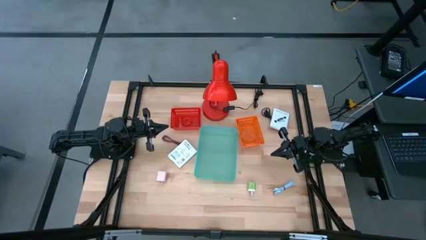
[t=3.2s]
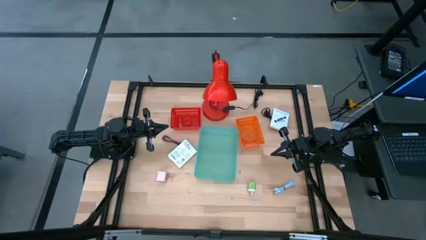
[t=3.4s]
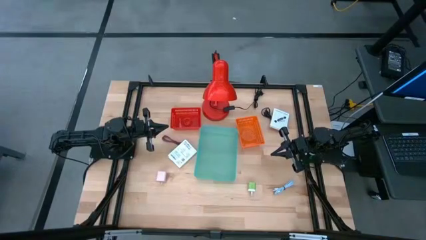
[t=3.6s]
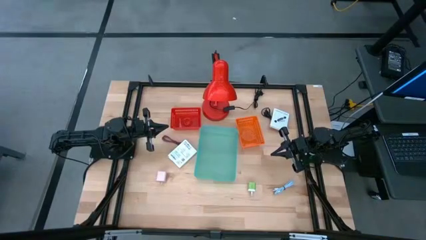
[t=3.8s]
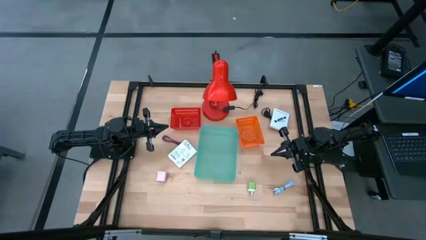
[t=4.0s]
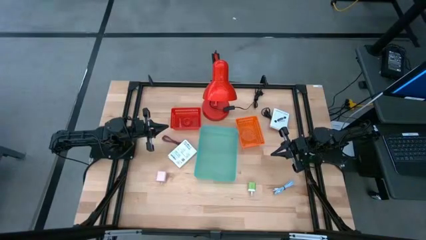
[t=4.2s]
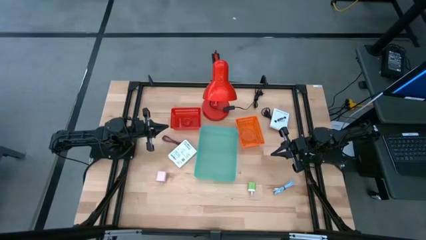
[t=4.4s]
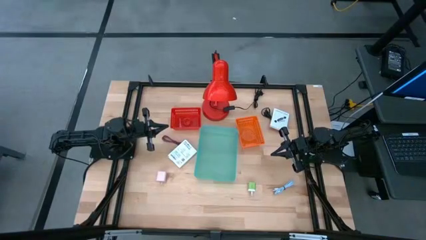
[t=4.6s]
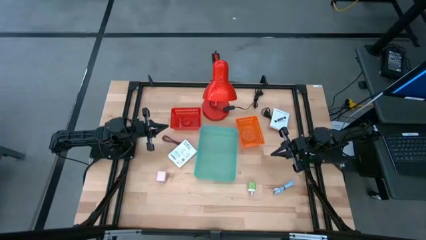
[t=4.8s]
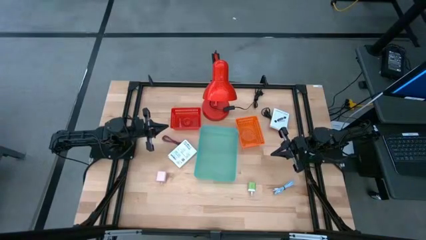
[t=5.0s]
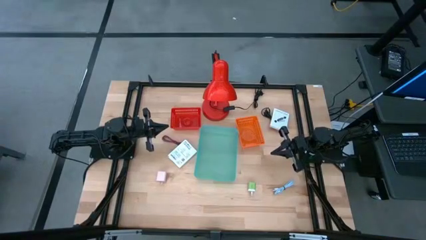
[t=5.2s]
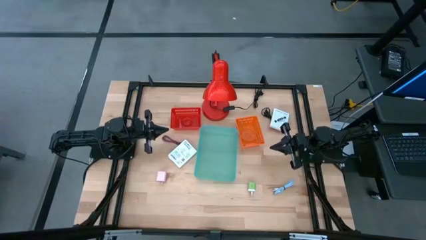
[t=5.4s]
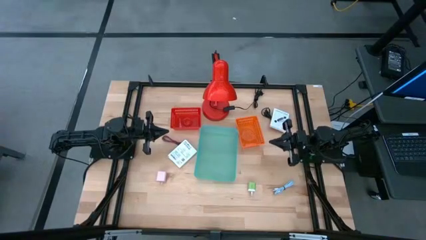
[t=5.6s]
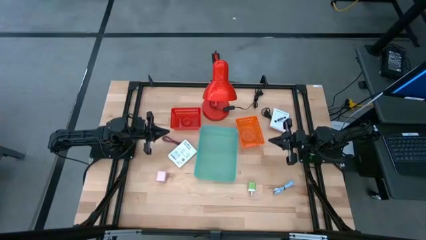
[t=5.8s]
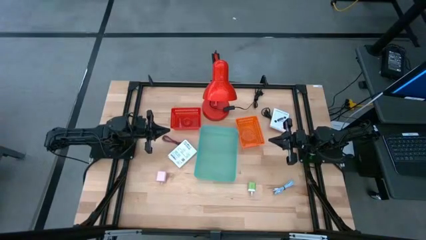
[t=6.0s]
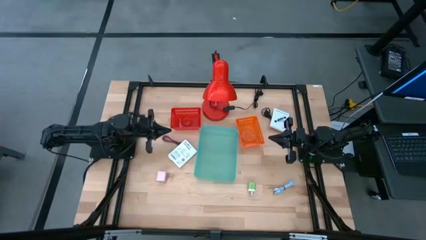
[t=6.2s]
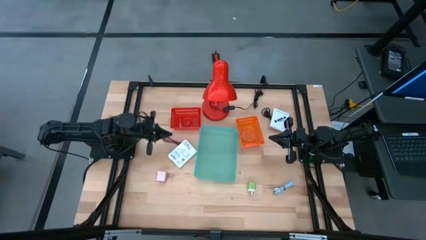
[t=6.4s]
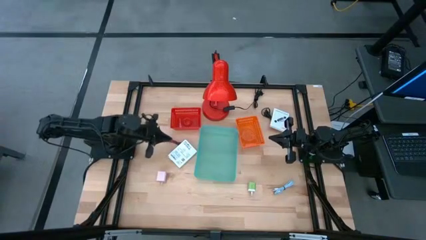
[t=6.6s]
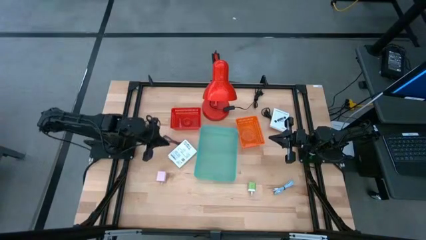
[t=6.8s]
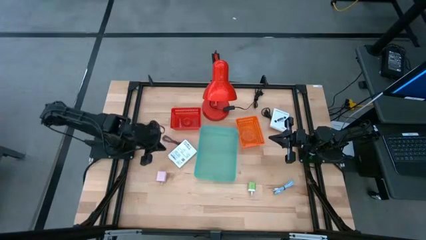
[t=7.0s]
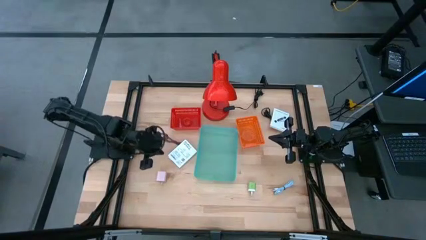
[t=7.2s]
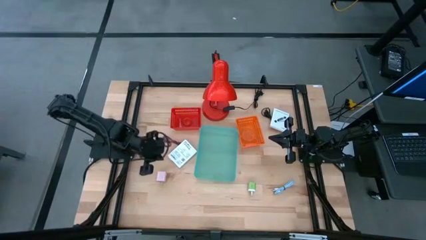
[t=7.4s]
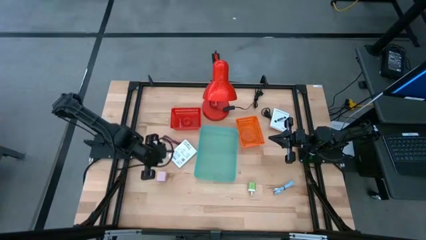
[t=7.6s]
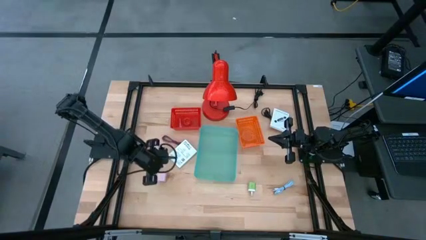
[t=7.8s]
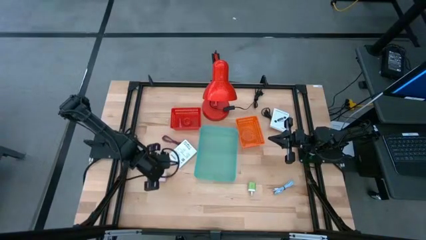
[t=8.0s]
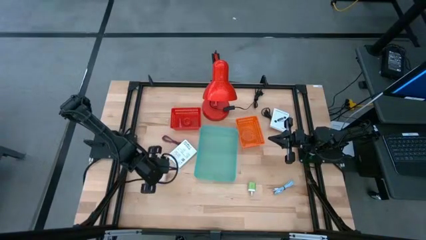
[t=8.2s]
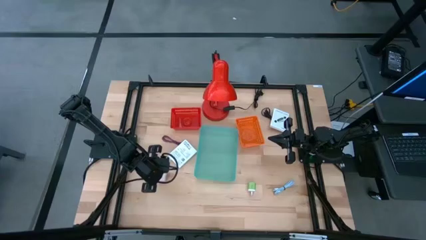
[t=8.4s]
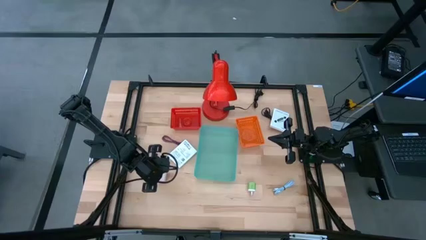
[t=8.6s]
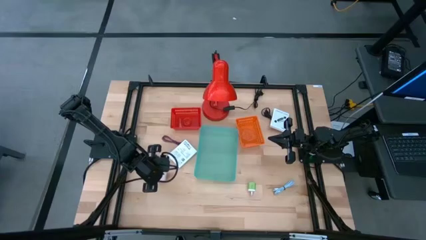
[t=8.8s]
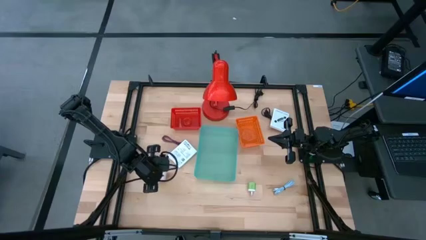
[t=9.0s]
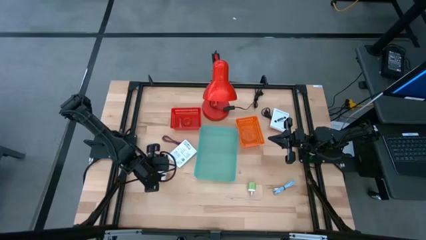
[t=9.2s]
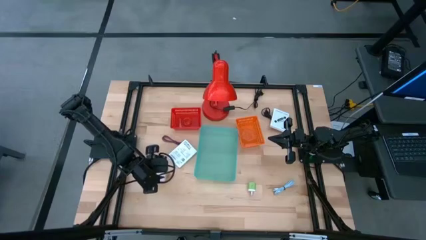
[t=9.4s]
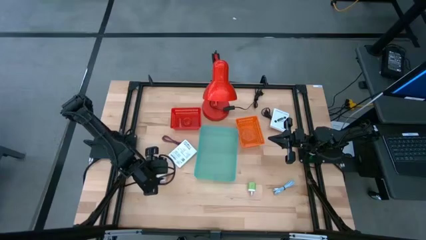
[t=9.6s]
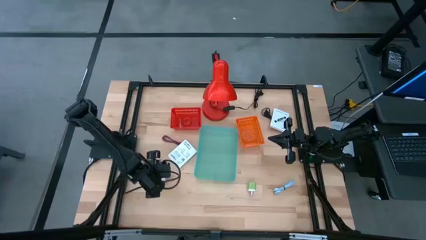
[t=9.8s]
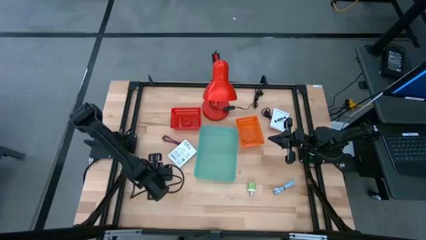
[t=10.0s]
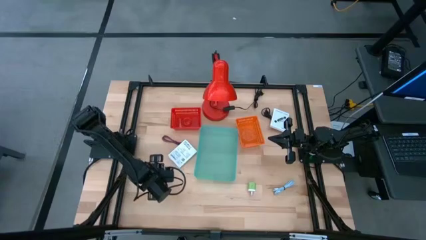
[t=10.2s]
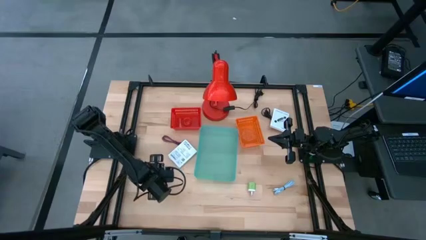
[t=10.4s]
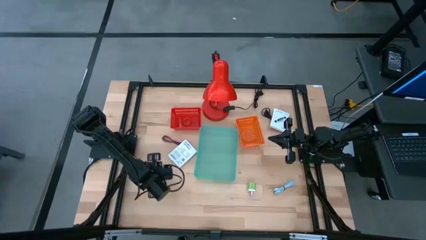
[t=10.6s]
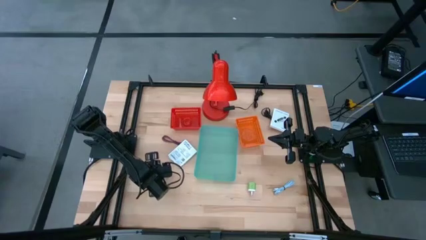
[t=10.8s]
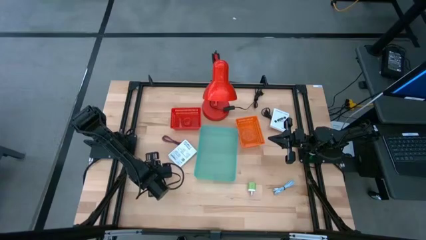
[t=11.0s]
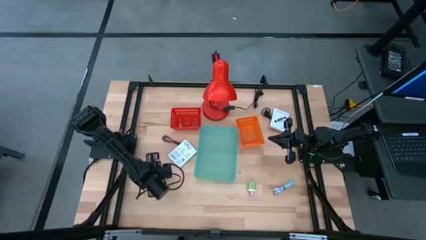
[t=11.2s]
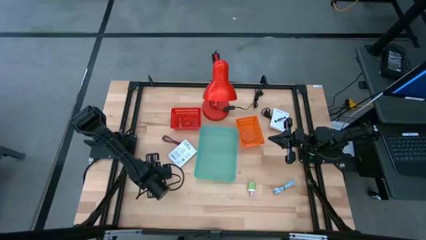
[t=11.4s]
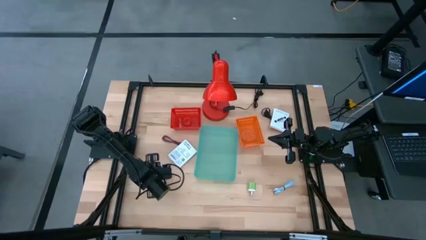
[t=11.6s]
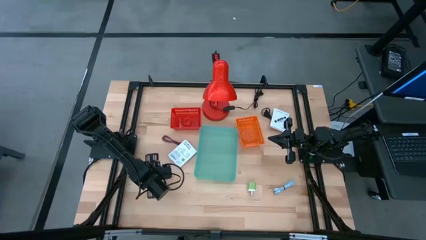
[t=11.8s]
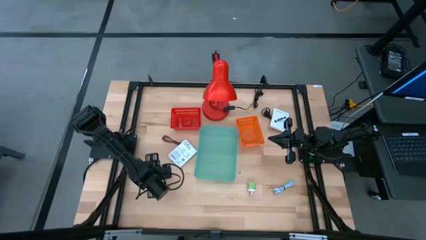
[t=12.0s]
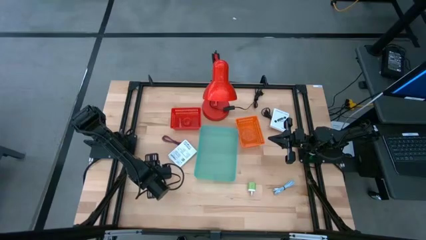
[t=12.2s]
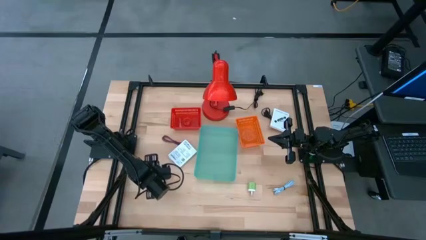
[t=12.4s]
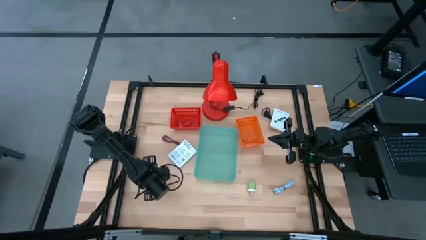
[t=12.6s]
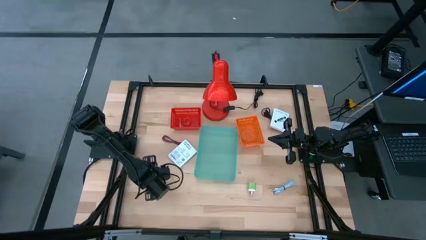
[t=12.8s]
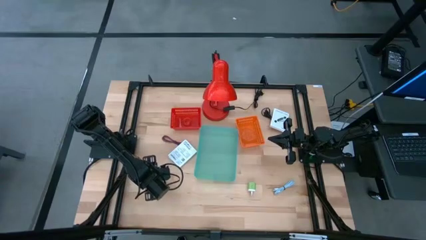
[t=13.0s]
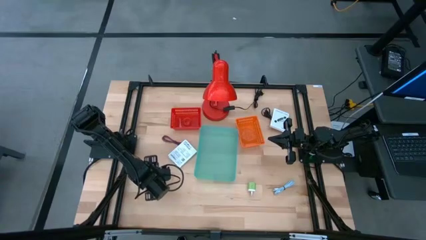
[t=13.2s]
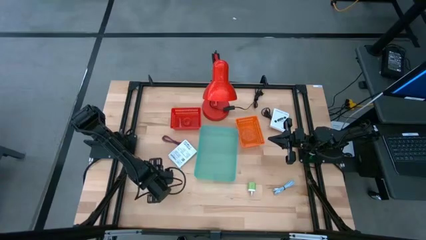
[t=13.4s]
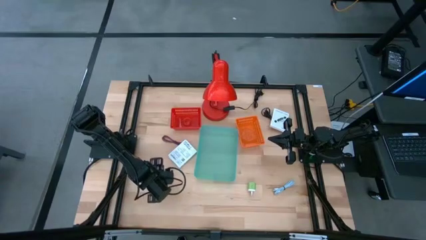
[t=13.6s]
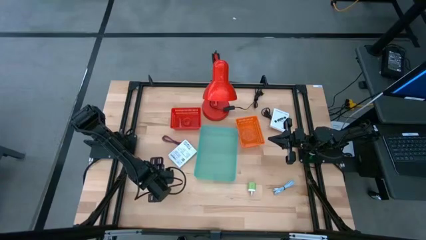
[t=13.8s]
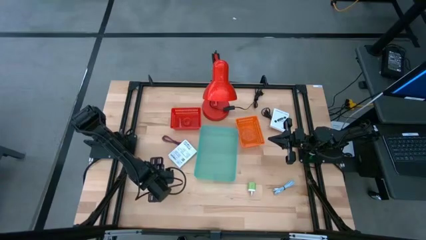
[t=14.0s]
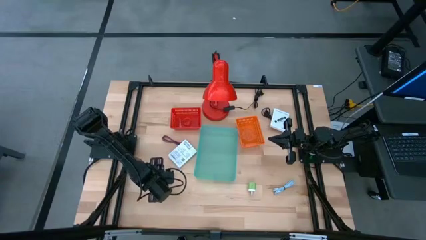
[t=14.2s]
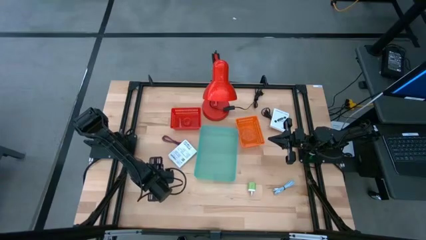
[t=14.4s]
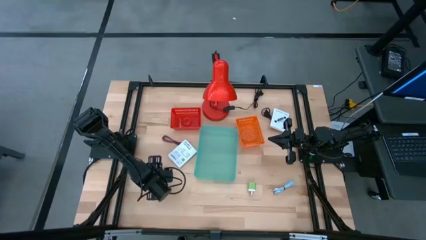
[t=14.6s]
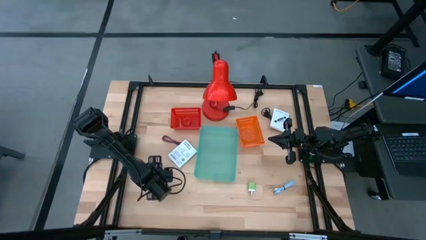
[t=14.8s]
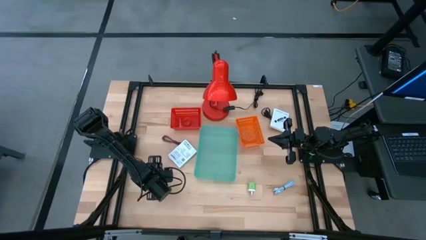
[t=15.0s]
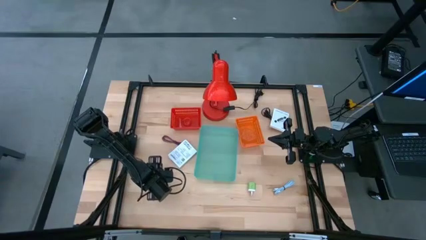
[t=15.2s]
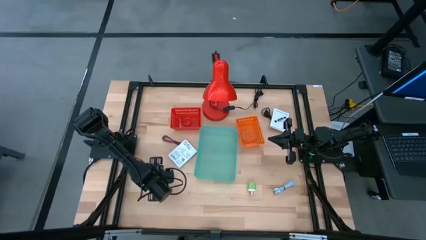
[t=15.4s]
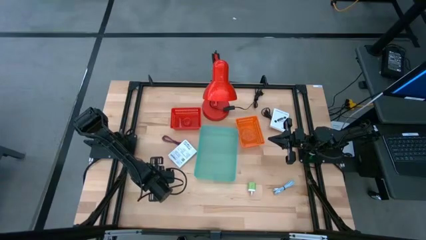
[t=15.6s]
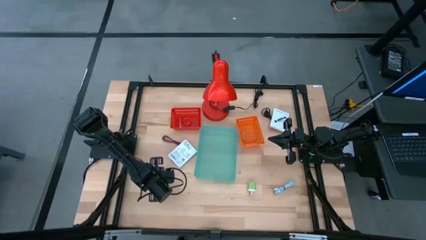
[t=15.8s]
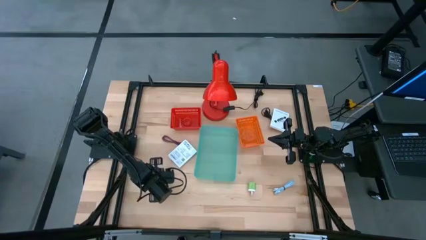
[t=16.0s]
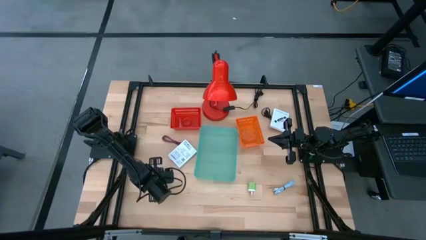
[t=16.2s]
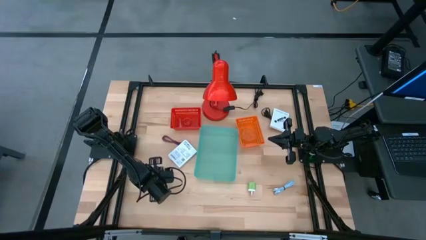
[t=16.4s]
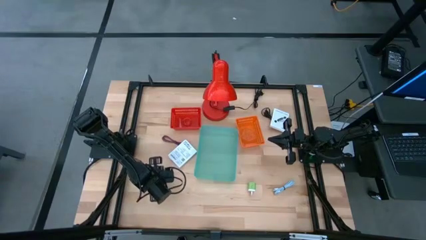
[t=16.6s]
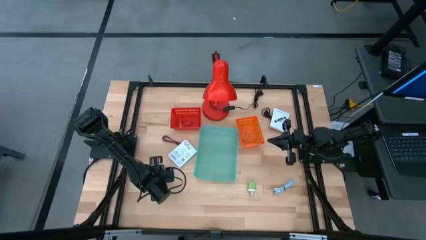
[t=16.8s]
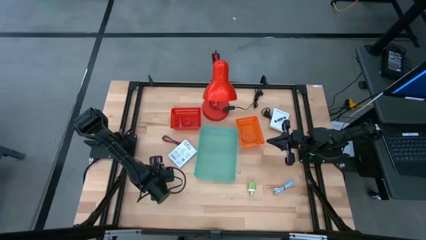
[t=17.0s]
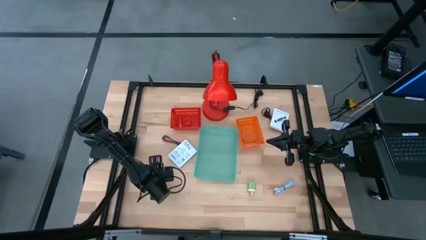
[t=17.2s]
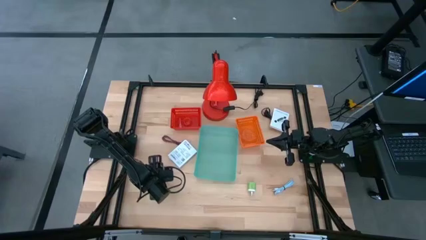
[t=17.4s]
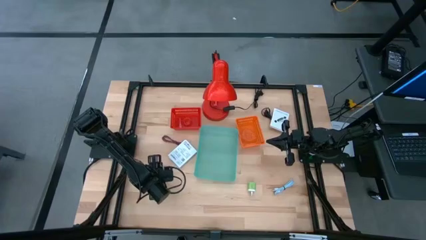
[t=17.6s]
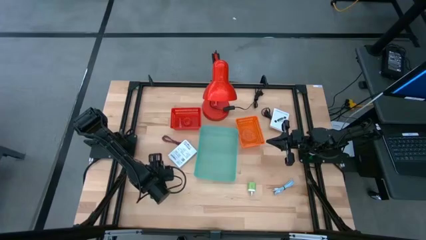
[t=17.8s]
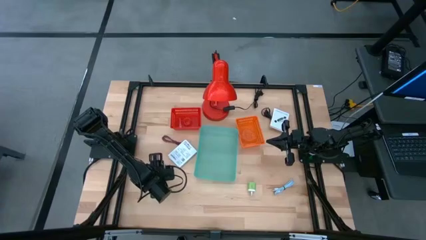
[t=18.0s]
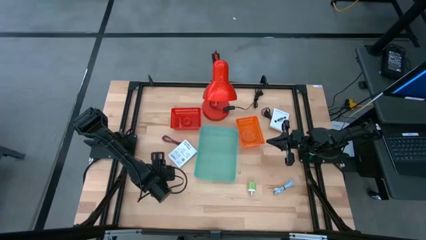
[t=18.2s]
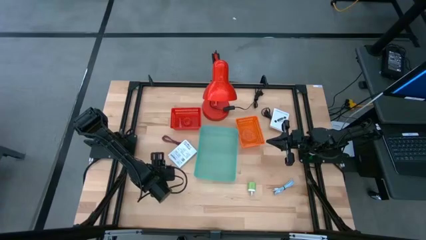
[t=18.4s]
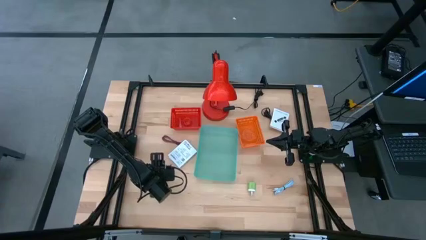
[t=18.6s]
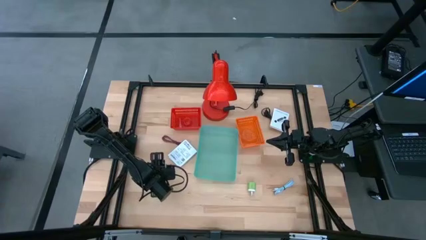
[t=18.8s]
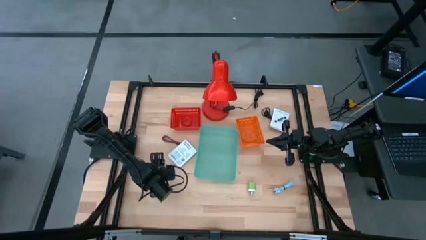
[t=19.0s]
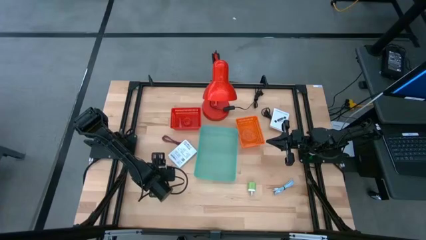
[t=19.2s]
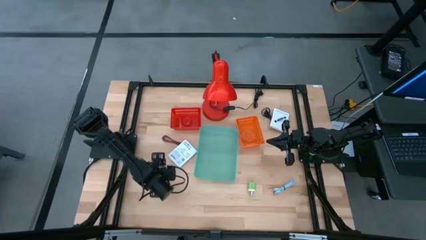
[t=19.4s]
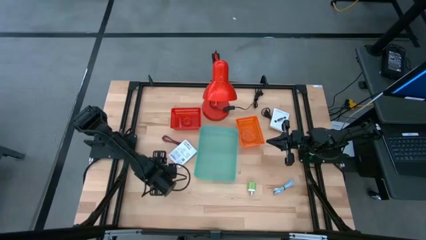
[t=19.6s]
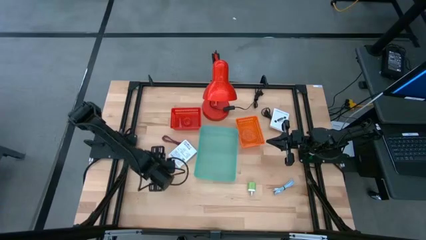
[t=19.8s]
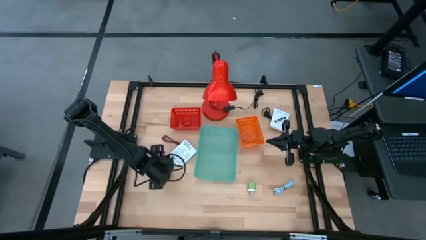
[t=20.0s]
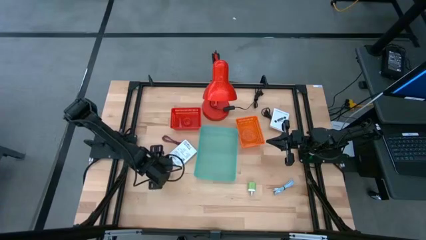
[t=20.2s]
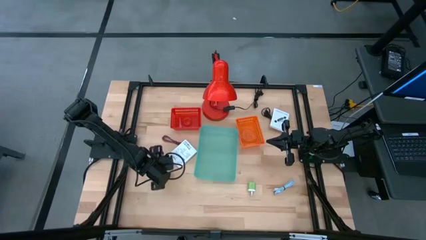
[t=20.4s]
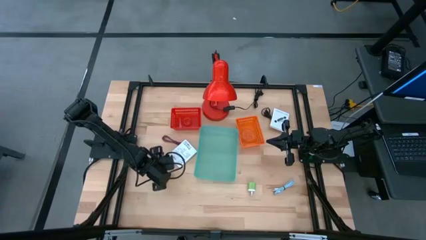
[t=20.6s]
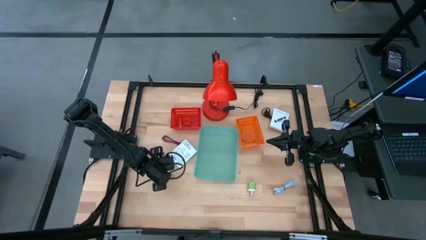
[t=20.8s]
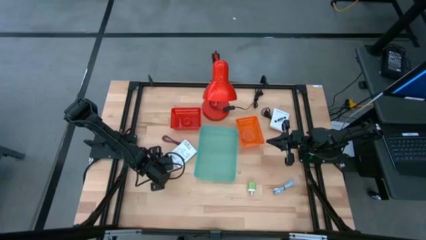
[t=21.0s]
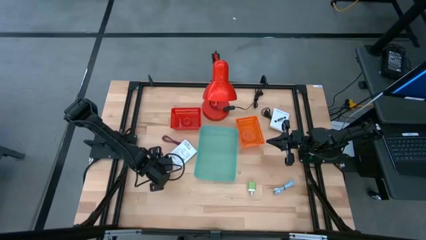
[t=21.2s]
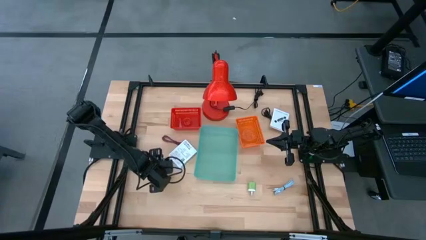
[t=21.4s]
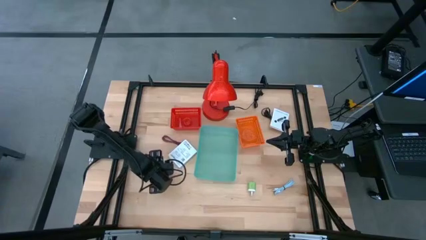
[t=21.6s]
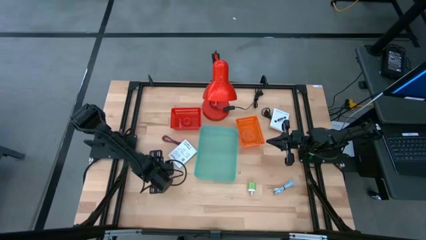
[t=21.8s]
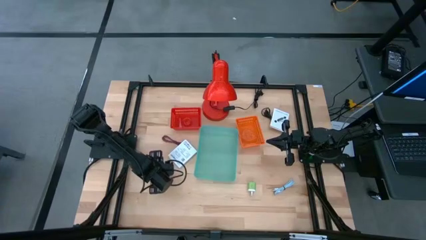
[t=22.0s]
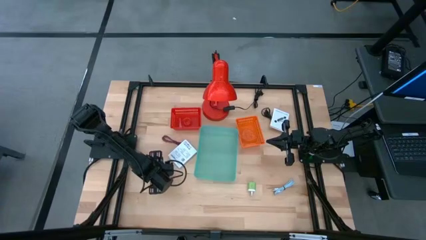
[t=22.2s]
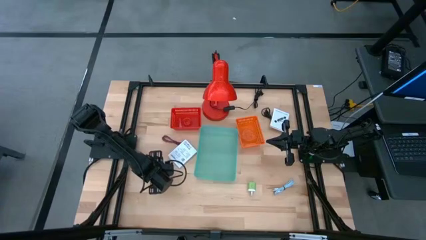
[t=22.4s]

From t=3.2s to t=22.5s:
Task: Pick and place items into bin
Put the pink charger adapter into the red basket
